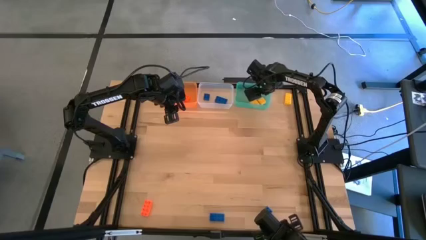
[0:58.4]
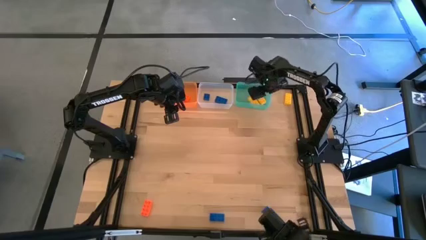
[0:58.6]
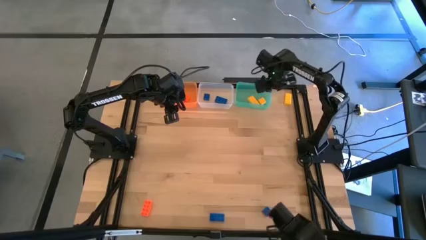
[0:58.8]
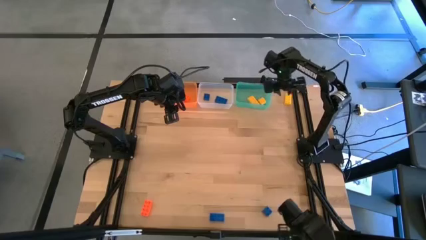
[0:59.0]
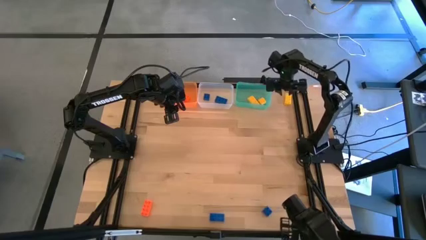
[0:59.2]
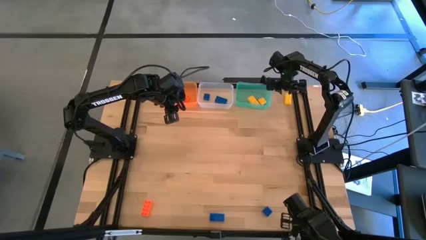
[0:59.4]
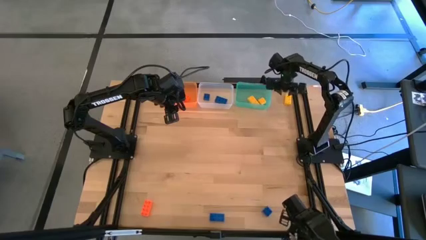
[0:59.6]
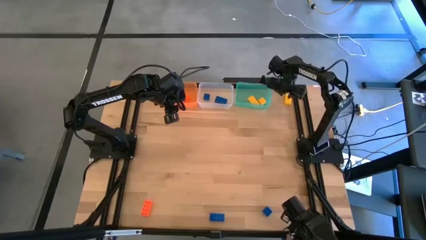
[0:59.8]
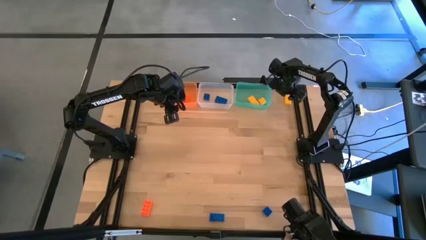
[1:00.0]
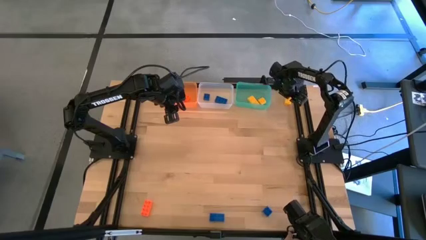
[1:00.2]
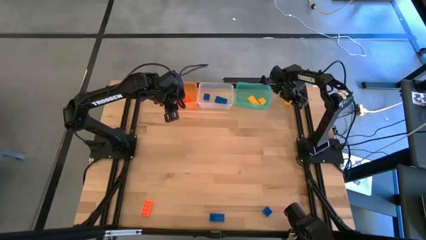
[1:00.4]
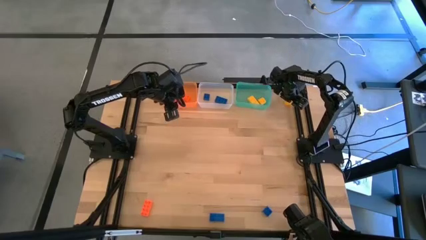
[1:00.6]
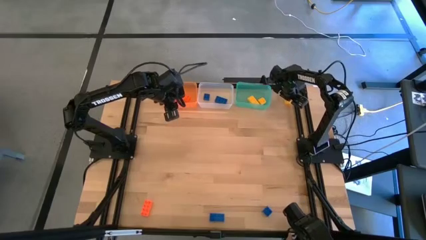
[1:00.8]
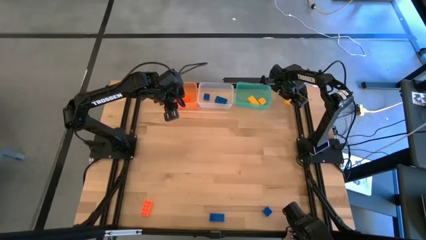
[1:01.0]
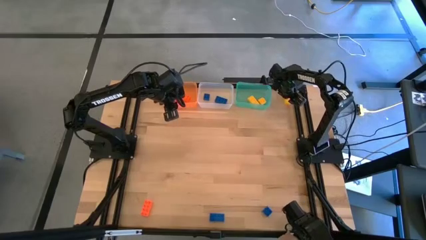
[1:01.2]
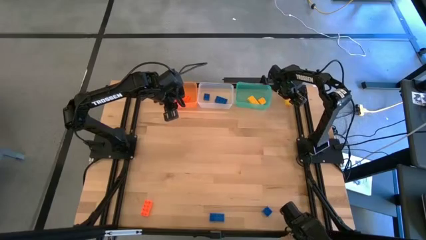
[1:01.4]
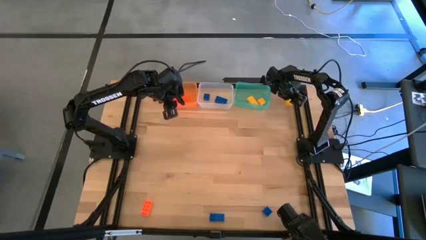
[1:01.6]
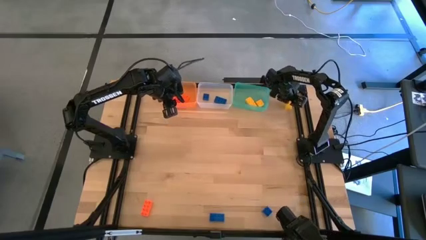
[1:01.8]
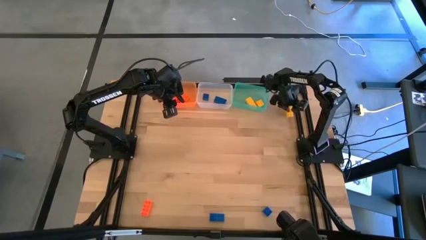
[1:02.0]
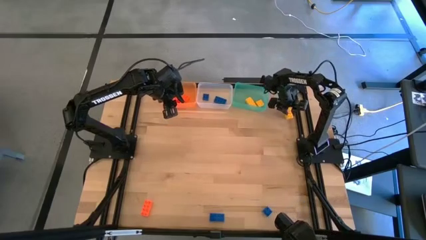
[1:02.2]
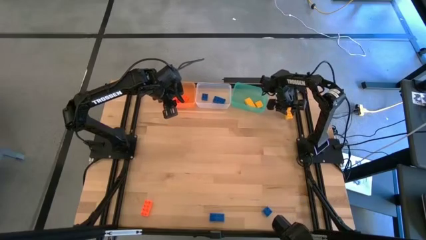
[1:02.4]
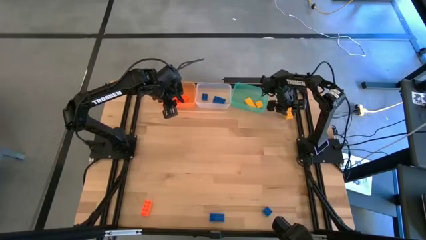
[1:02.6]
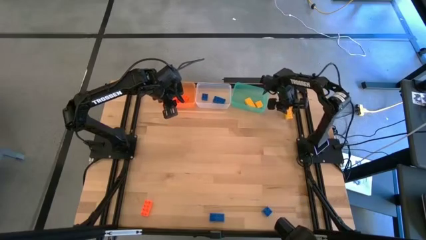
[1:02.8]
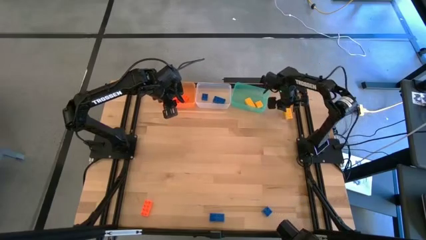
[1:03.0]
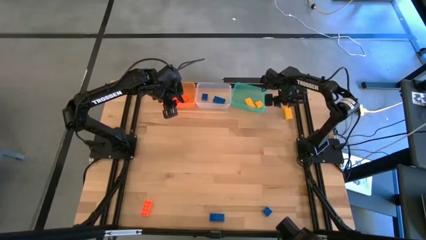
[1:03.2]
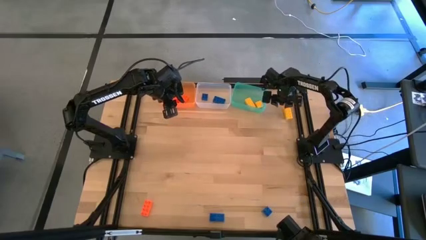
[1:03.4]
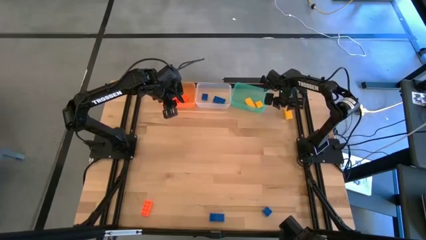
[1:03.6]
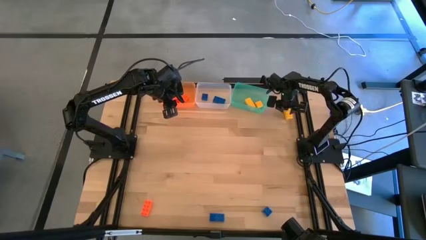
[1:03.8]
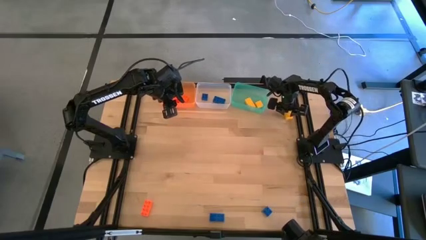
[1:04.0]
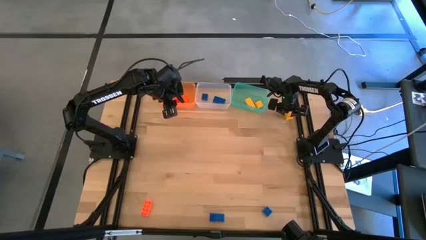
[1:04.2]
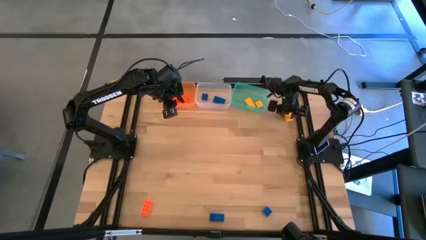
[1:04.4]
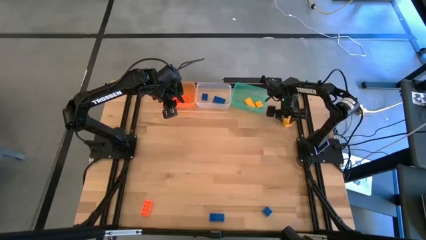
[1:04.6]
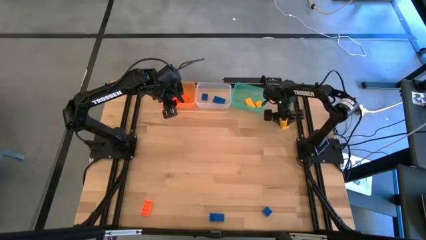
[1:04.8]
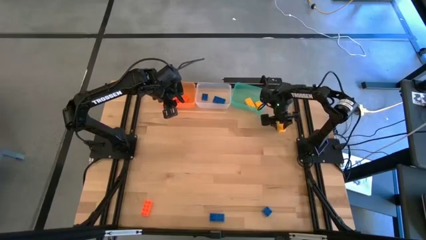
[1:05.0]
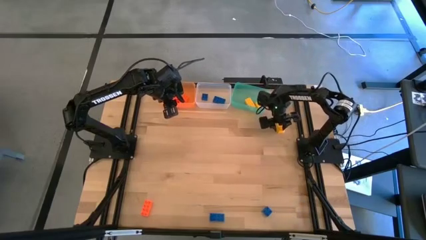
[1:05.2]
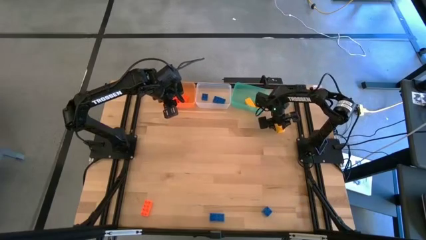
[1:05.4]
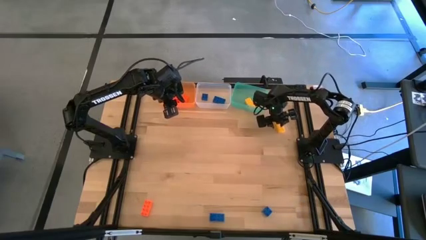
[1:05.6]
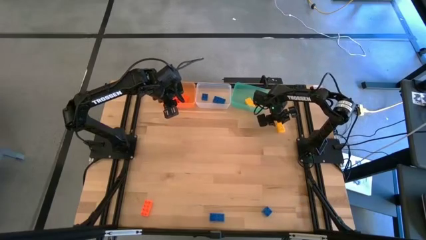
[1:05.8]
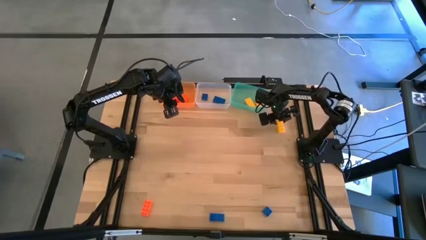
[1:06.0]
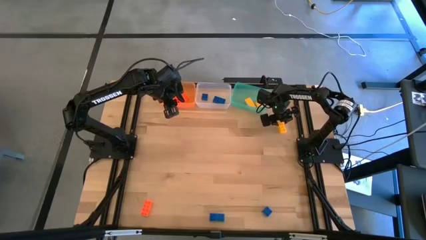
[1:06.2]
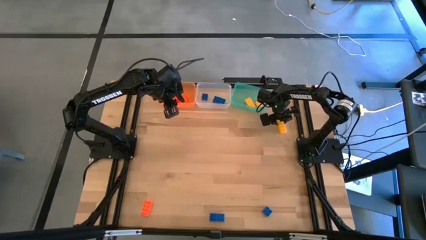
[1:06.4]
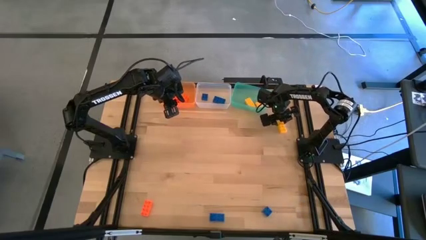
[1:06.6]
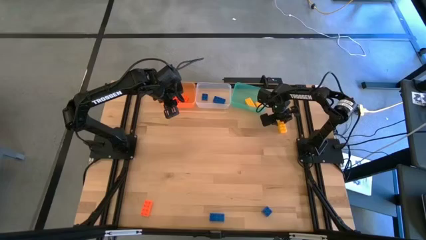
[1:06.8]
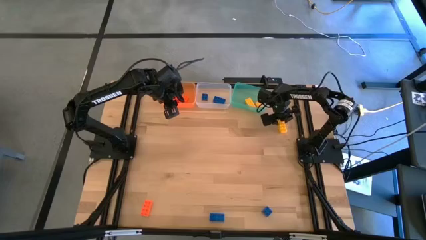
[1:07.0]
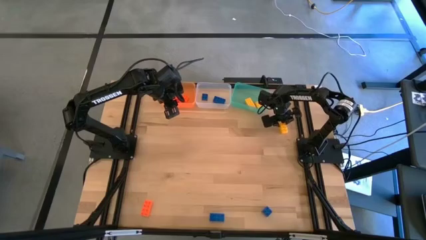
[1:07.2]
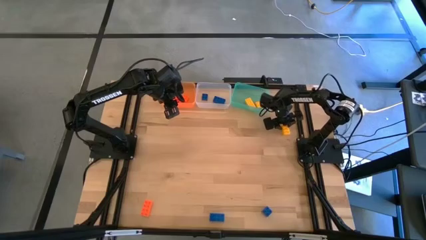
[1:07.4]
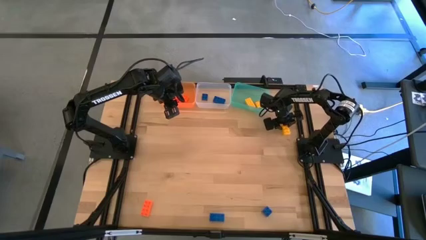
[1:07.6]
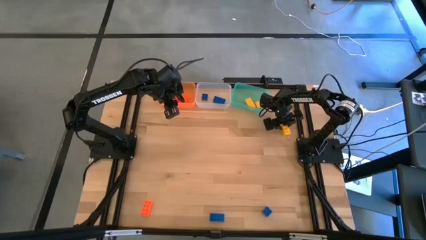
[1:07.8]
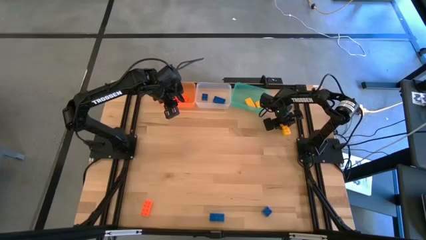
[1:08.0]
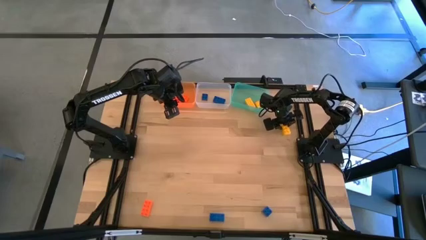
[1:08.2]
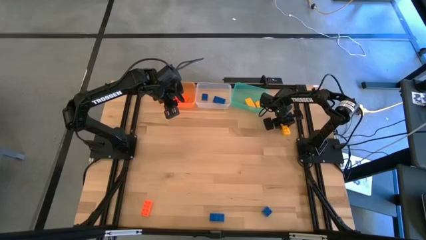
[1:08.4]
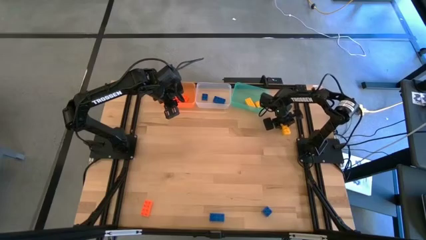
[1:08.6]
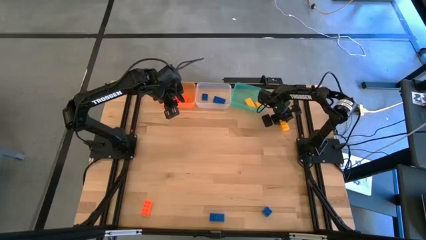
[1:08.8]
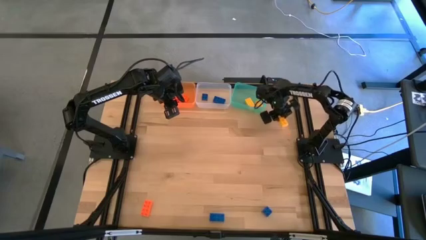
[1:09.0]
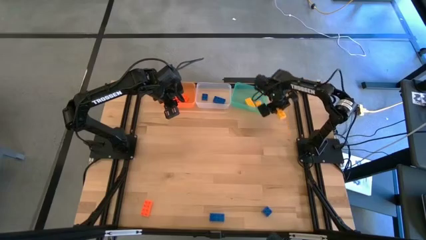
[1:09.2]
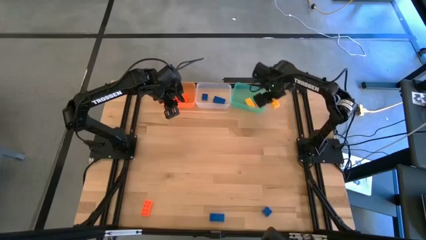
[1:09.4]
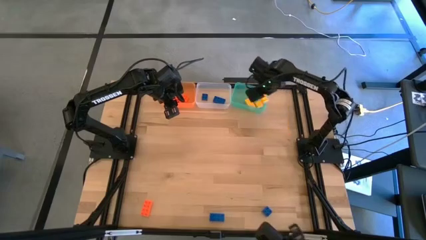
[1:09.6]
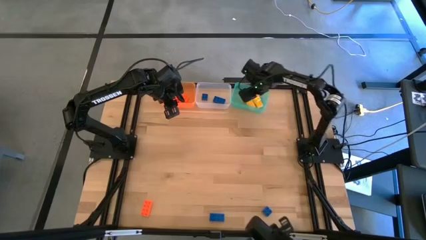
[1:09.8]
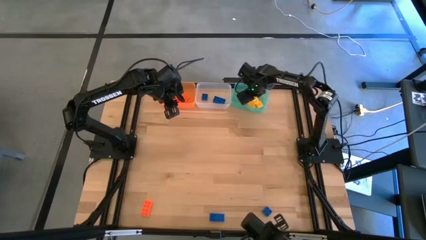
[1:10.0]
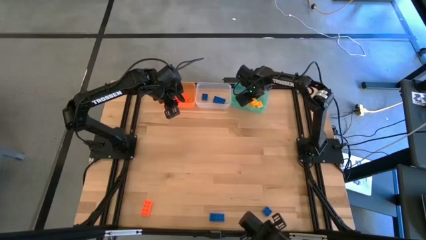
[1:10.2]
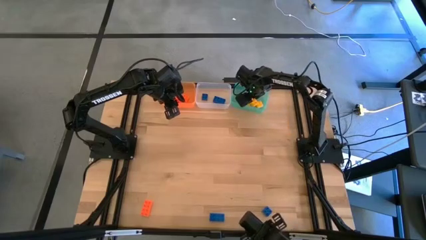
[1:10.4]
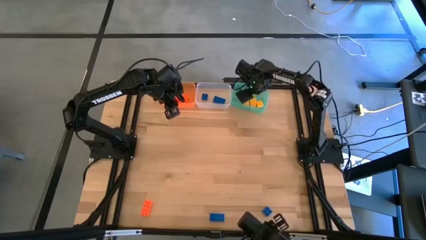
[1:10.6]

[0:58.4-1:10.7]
Task: Sort & place blocks by color
Put the yellow game piece into the green bin

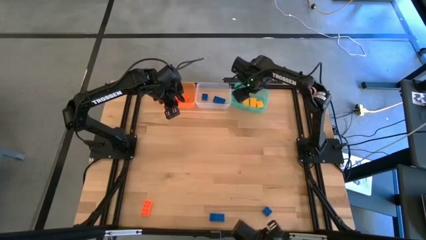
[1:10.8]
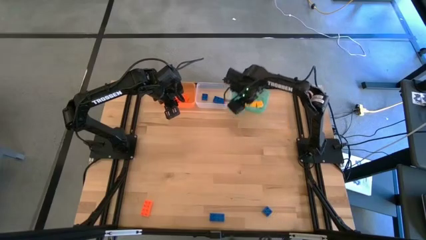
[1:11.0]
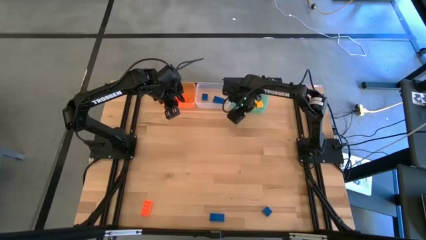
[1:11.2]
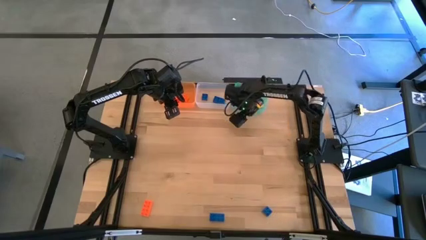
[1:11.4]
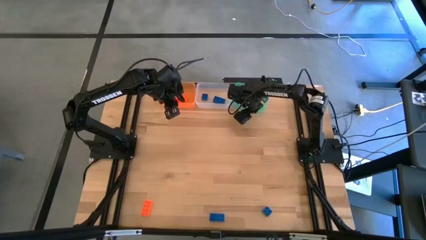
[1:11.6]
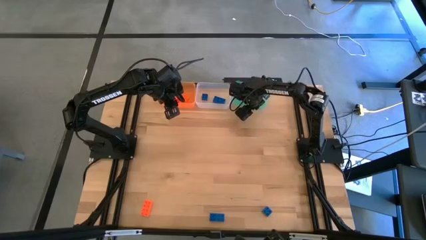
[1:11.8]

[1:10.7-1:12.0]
Adjust the green bin on the table
